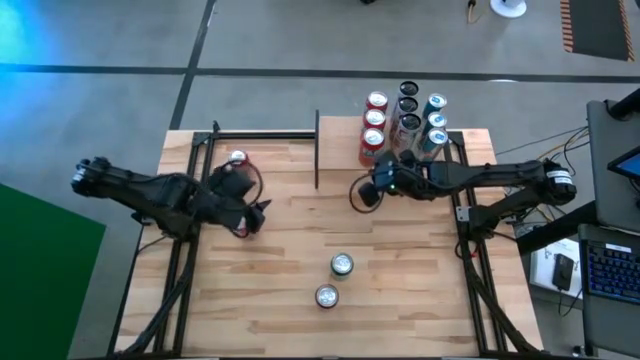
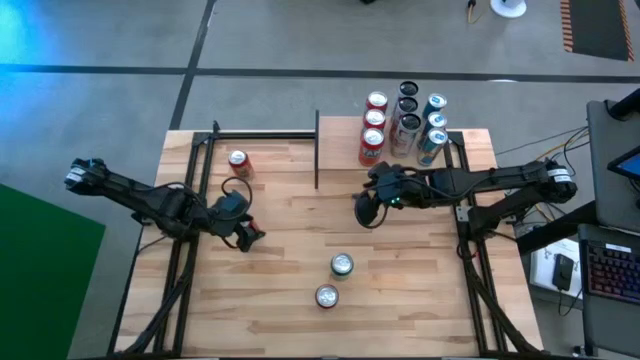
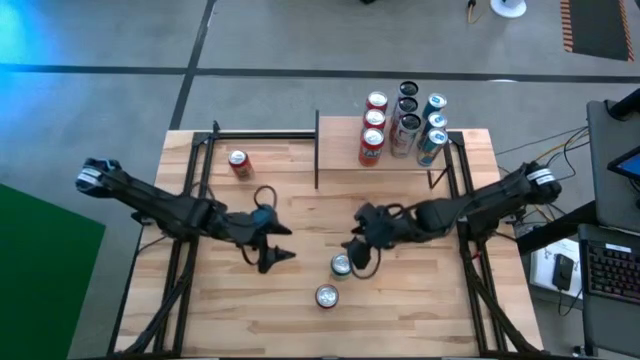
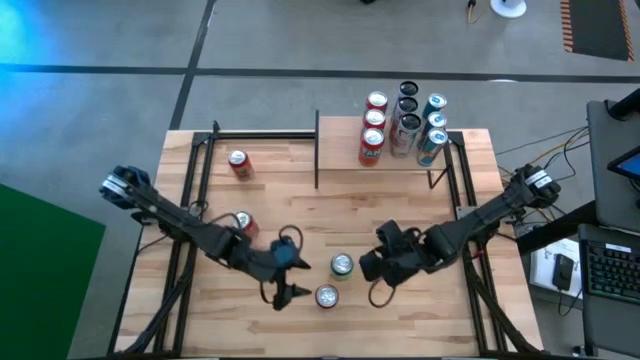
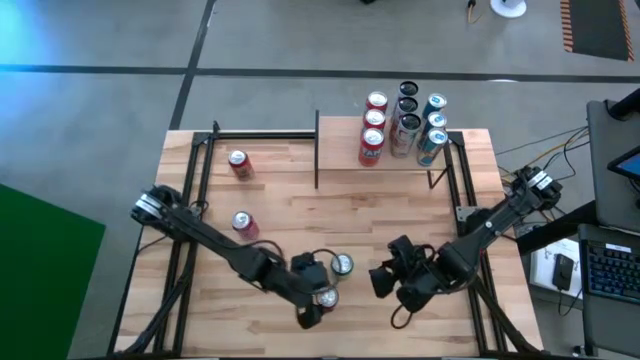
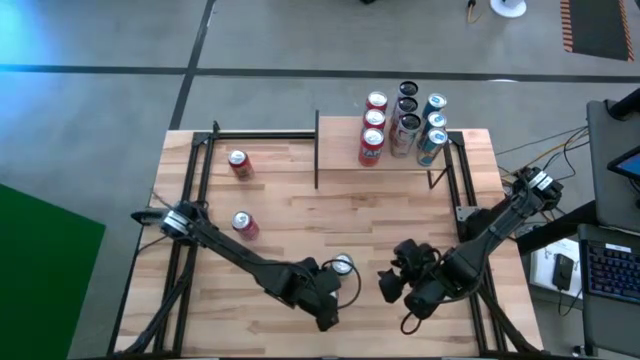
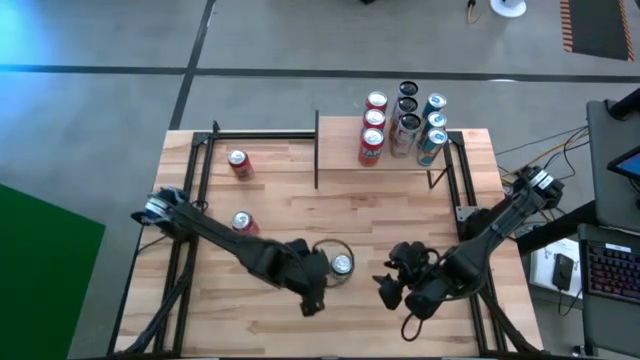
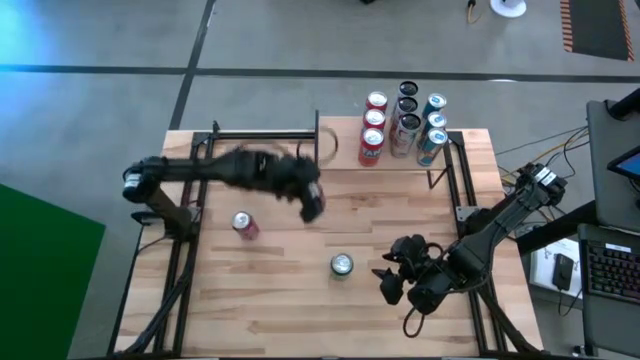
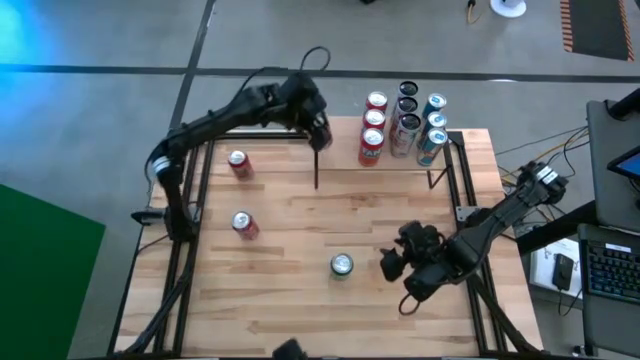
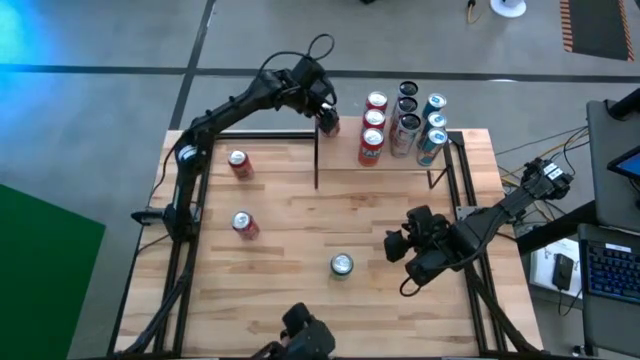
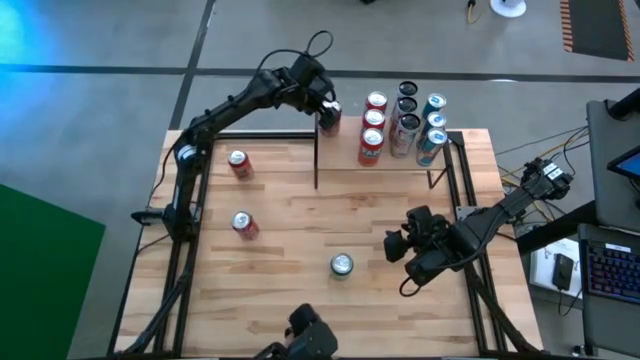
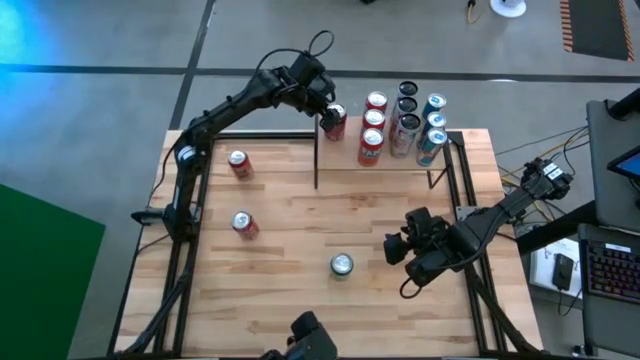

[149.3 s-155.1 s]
Task: Place canned beverage on shelf
Put the bottom red-black soda can on the shelf

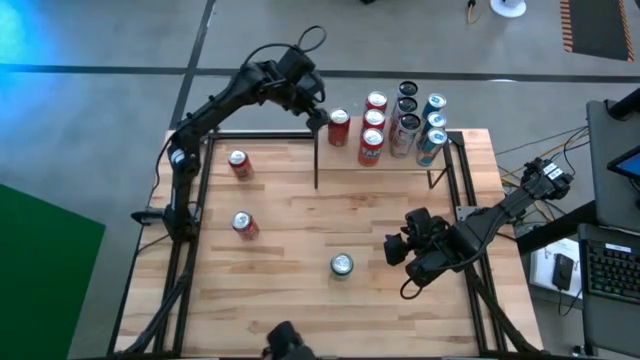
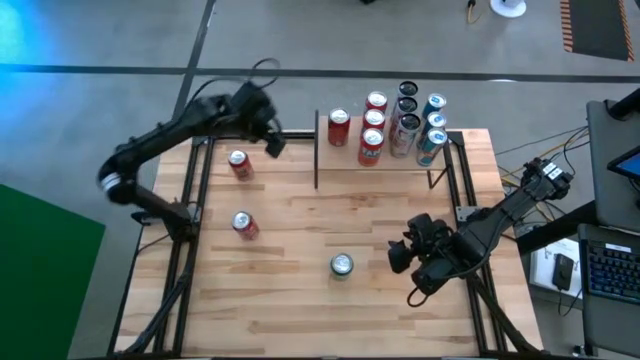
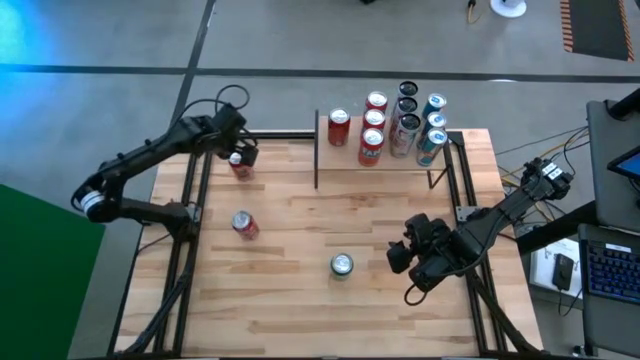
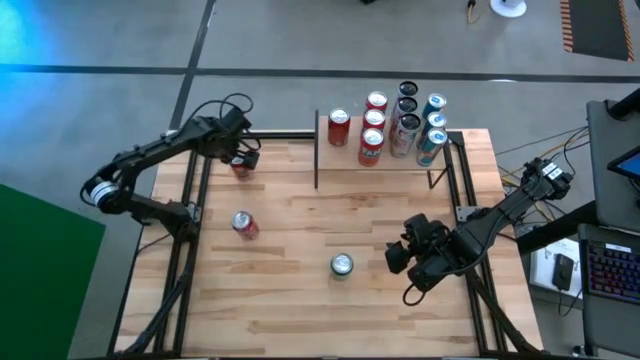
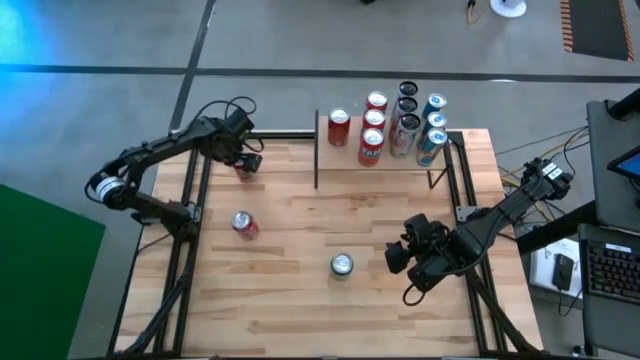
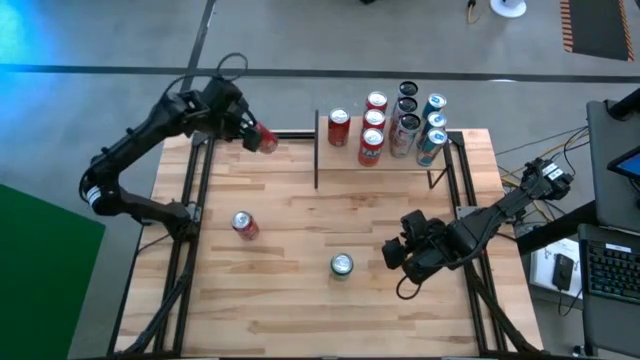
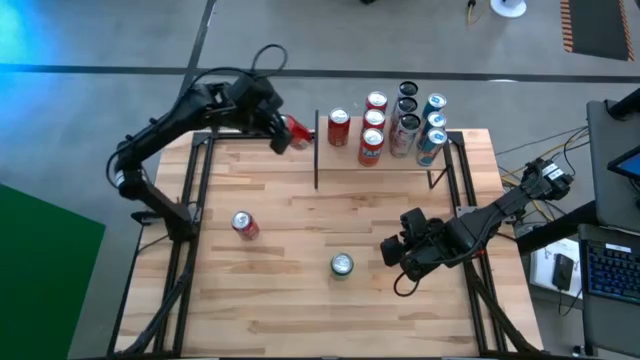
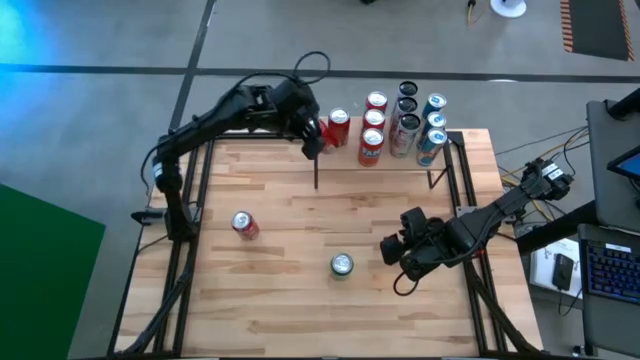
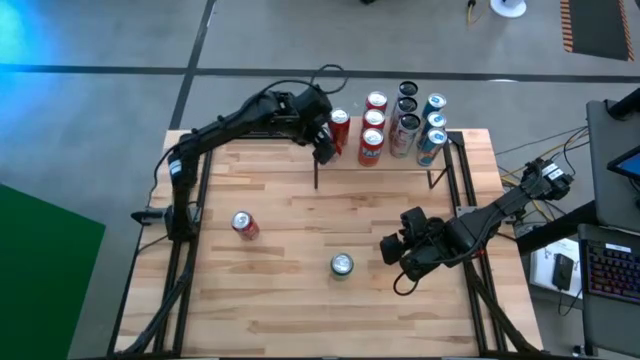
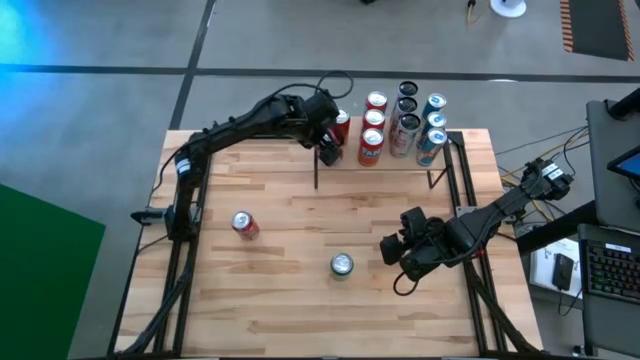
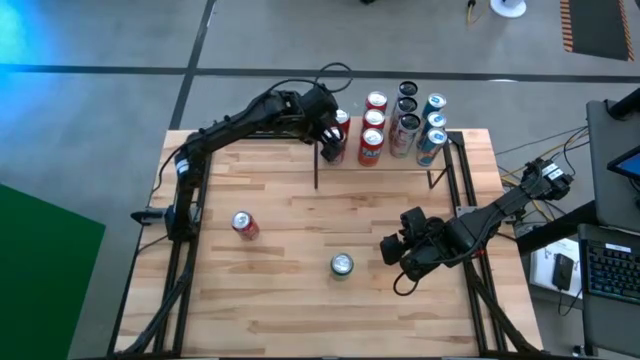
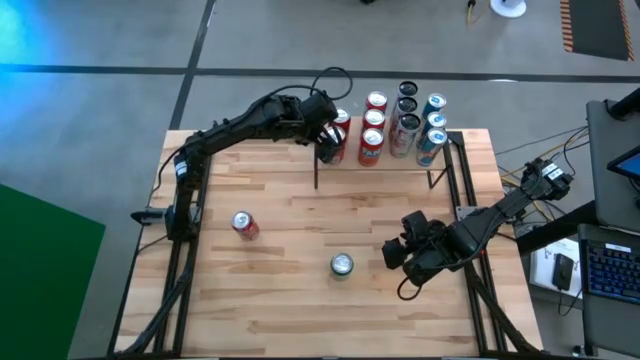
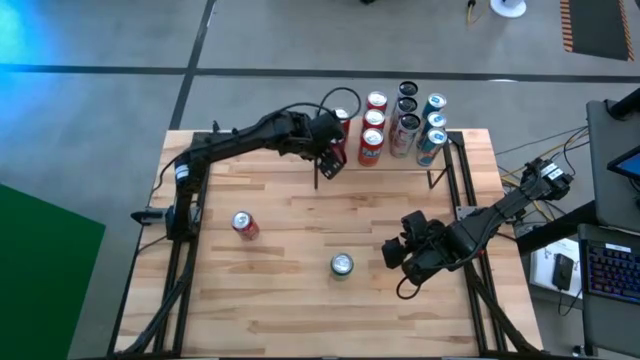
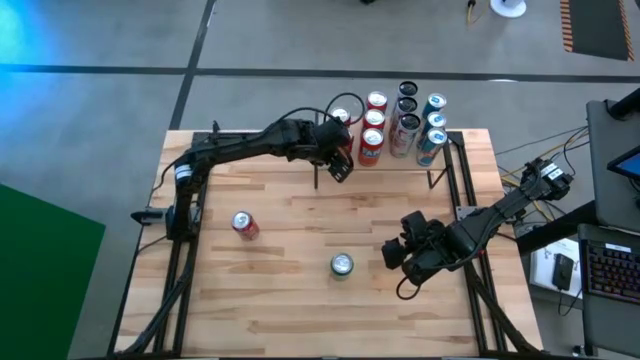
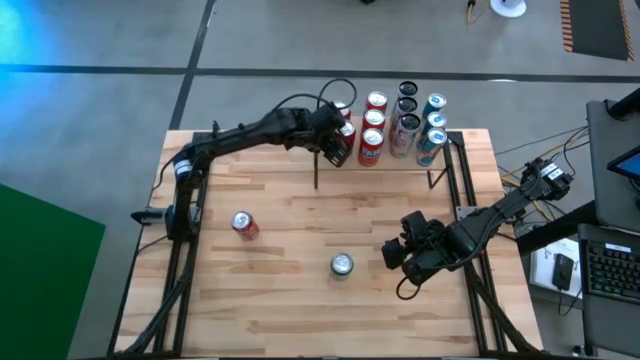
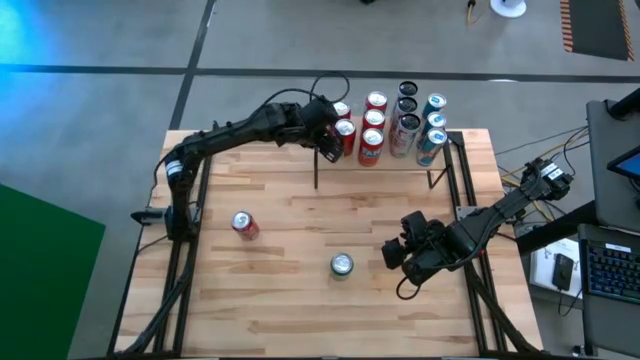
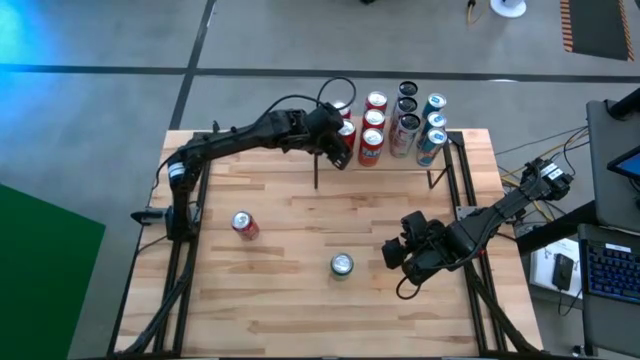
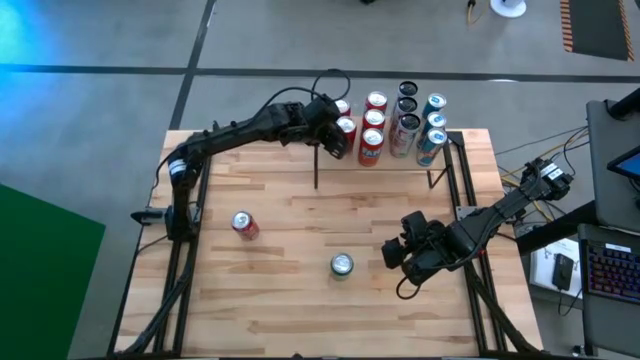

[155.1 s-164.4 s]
Put the red-black soda can on the shelf aligned with the other red-black soda can

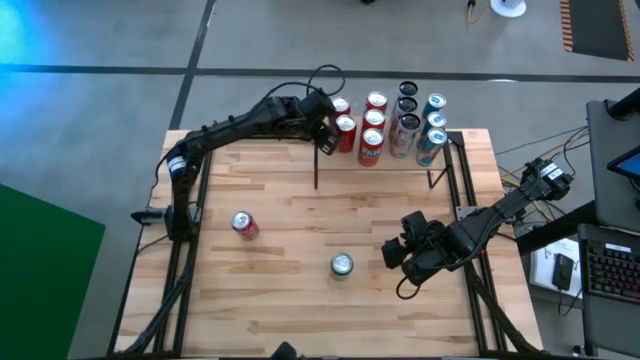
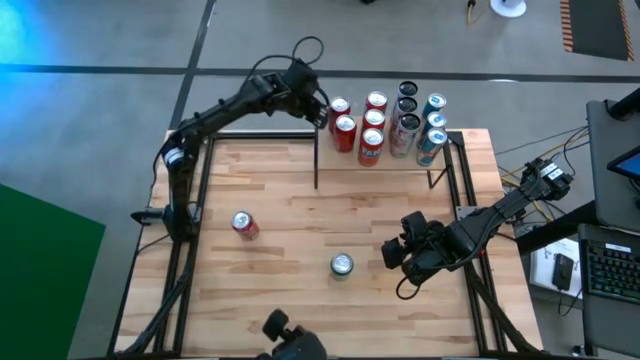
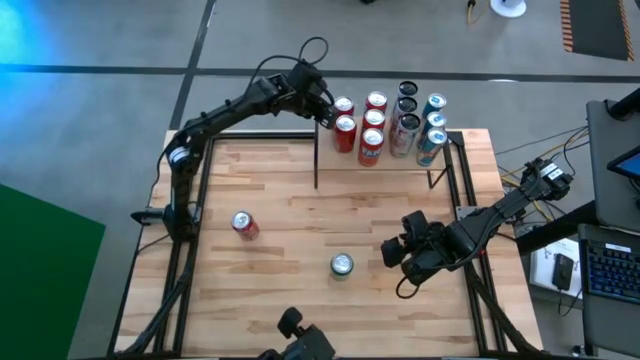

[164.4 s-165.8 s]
Adjust the red-black soda can on the shelf

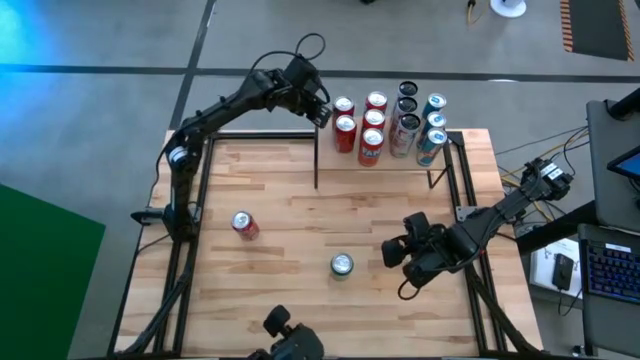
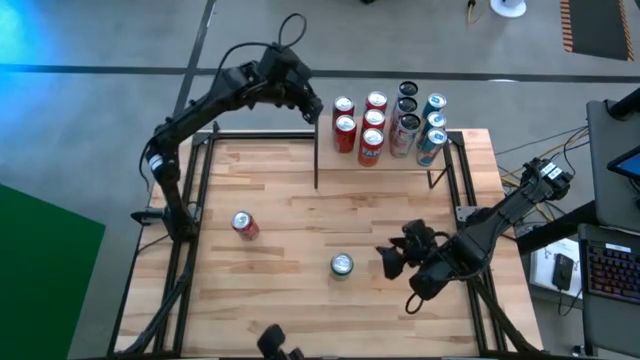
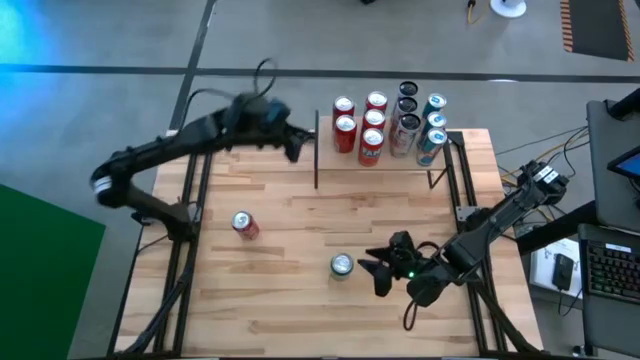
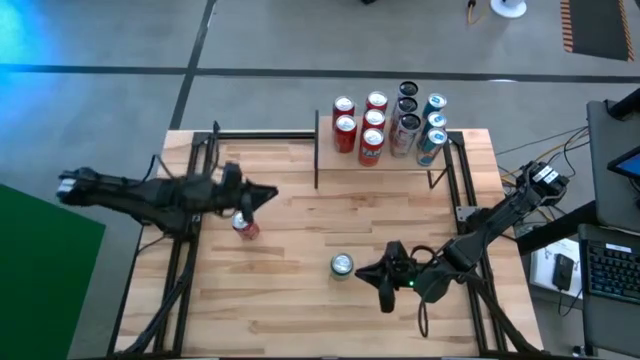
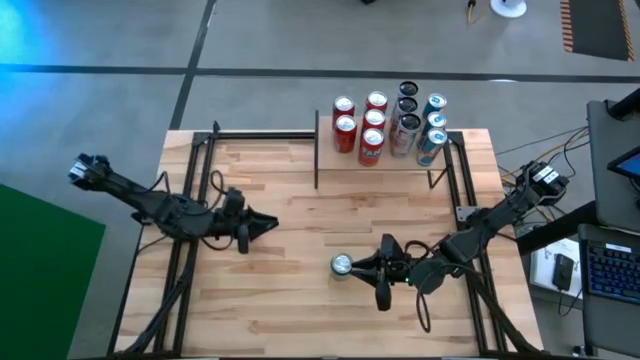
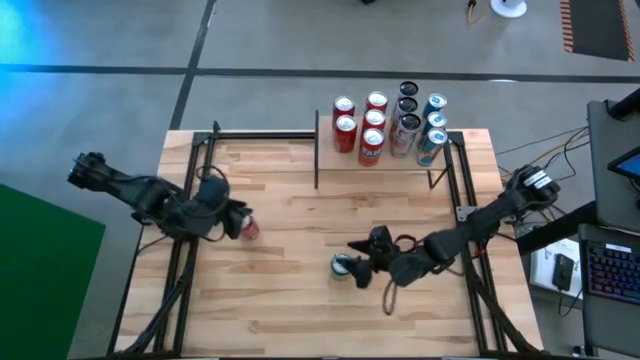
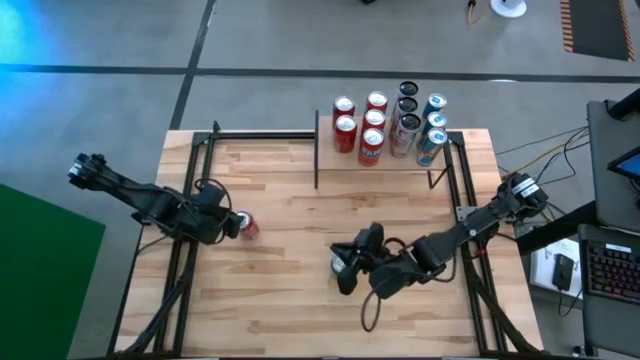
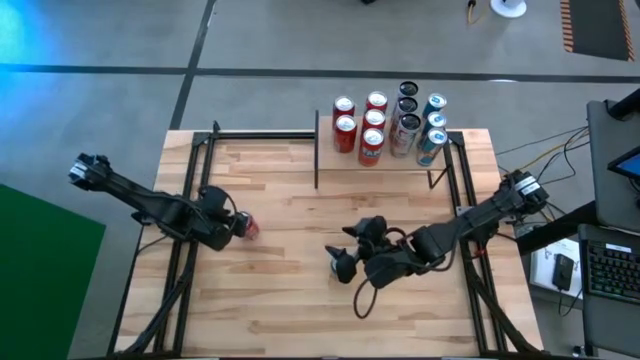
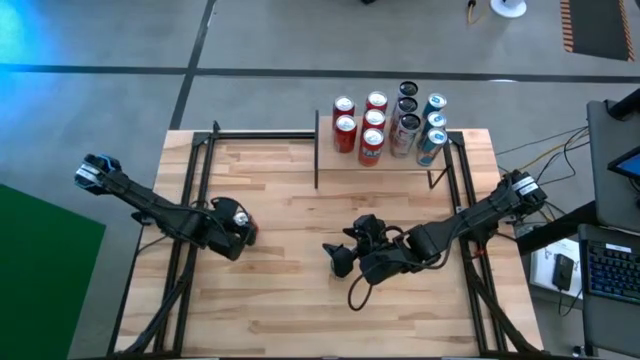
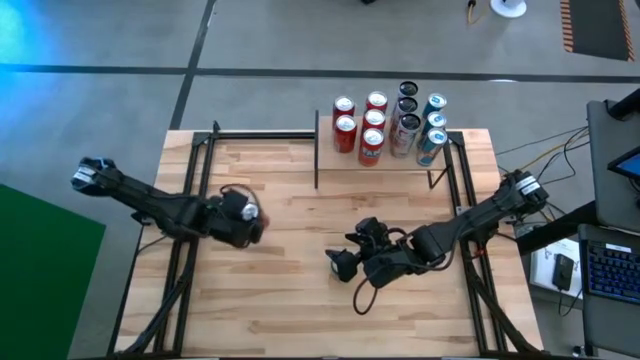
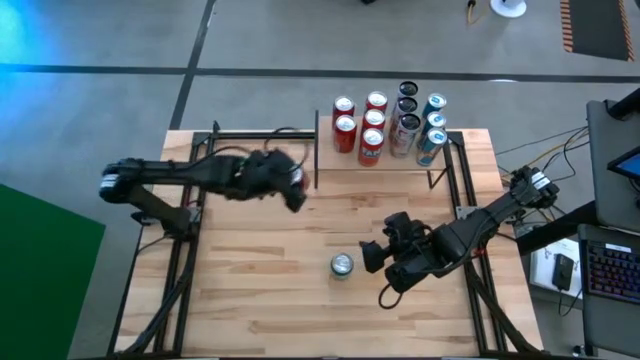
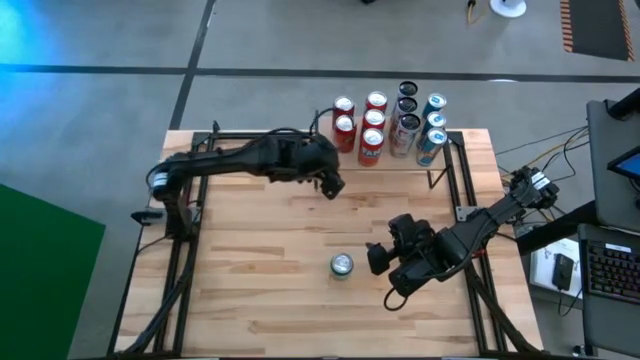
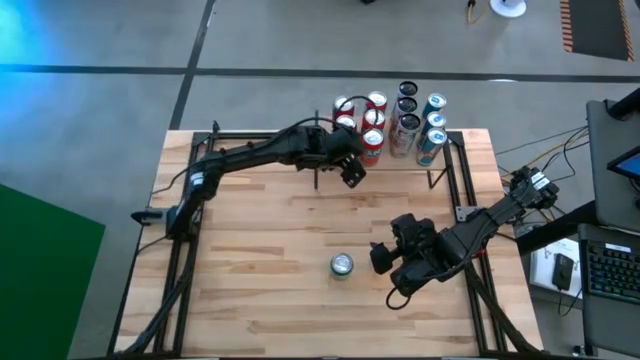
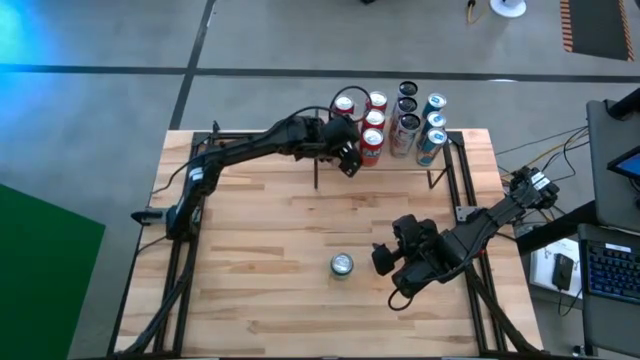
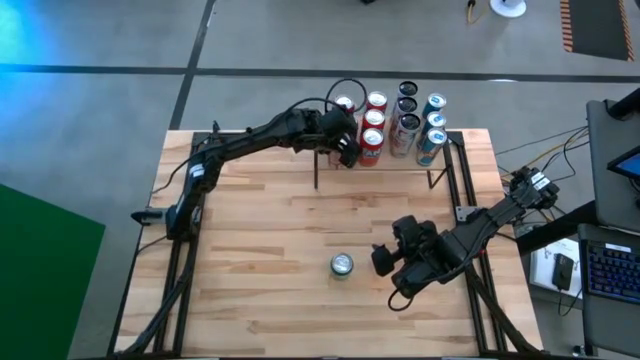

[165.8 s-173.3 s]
Put the red-white soda can on the shelf aligned with the red-black soda cans
